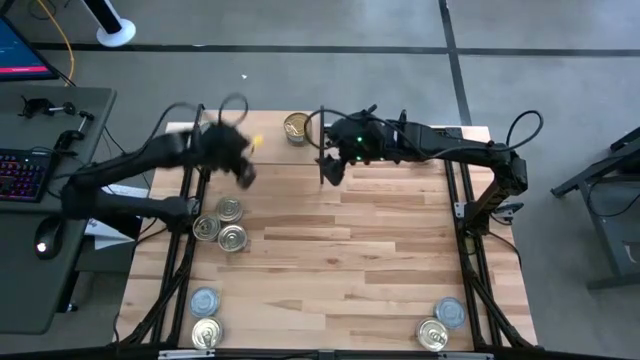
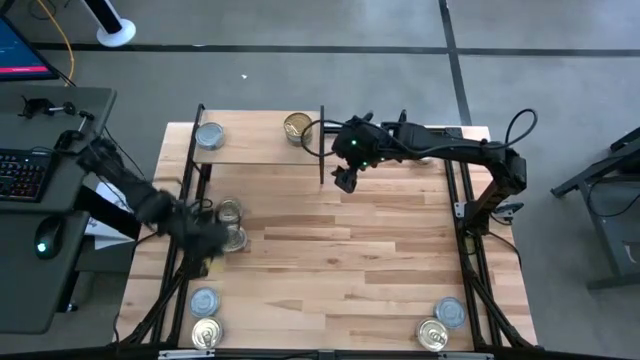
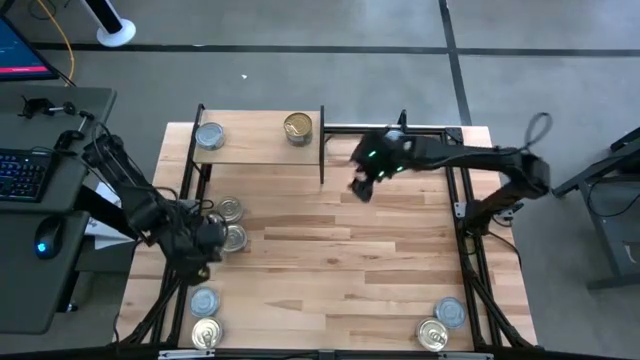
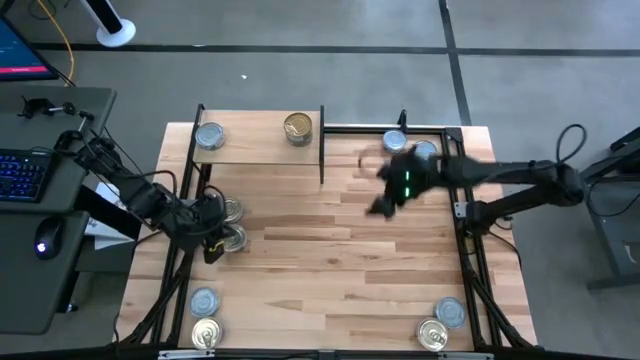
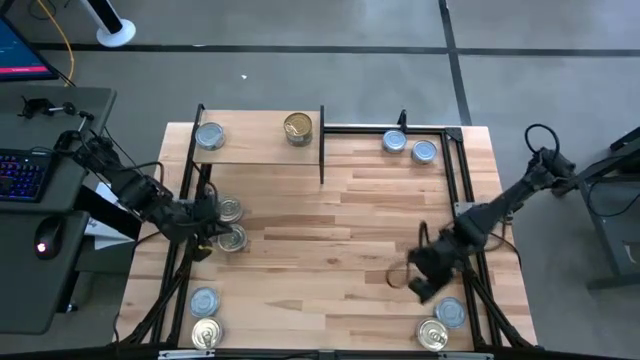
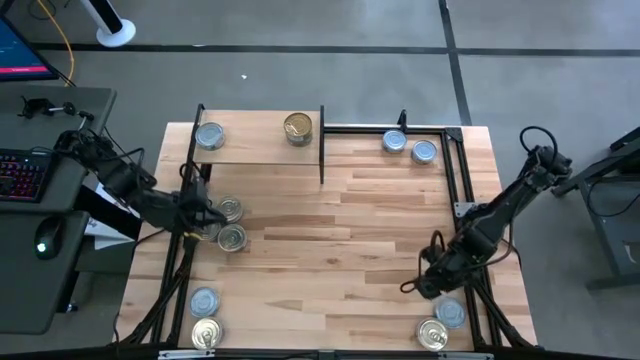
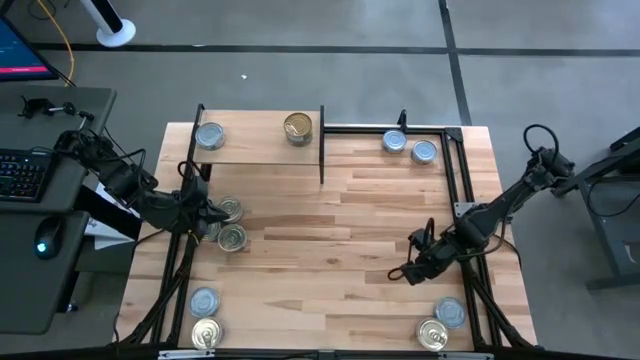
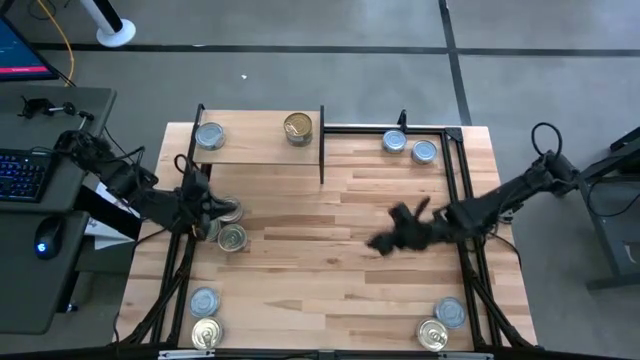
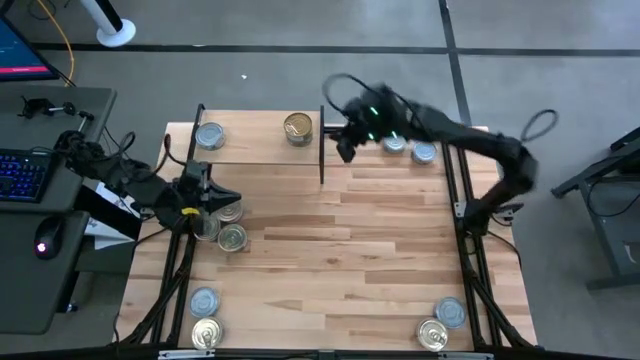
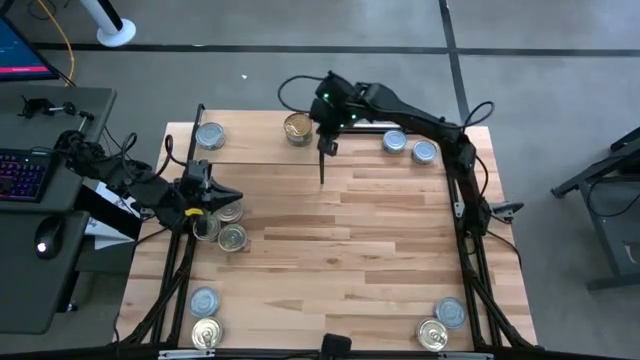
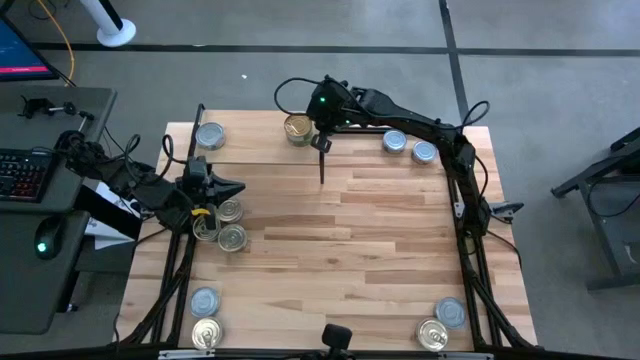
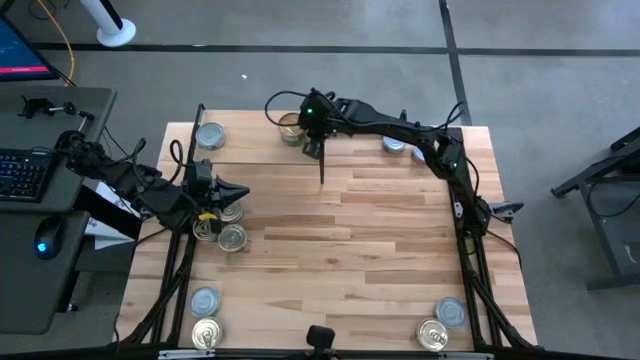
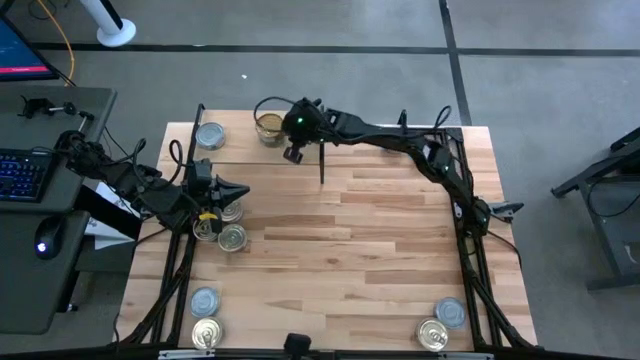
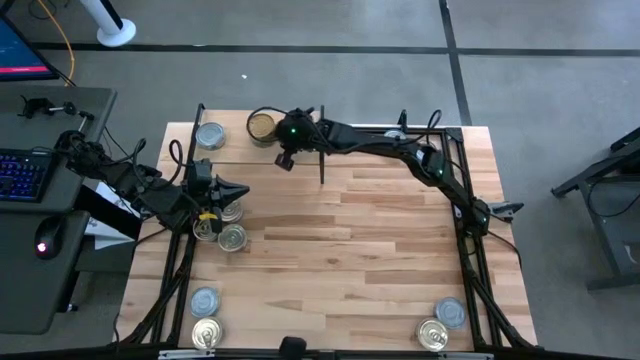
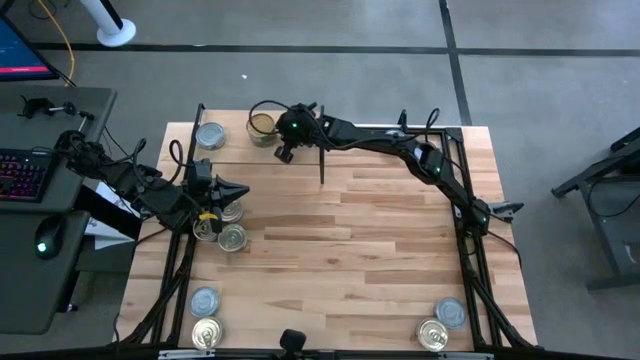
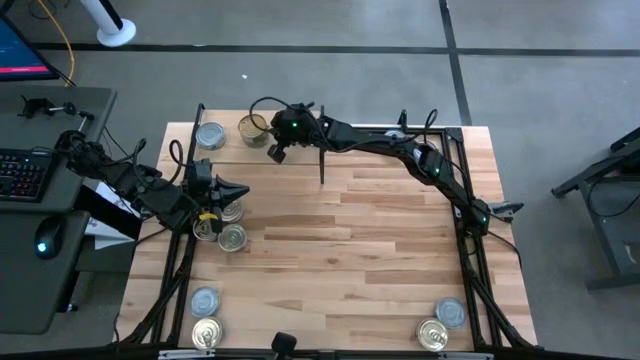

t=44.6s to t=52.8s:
Task: Stack canned seafood by type on shelf
Adjust the green tuna cans on the shelf

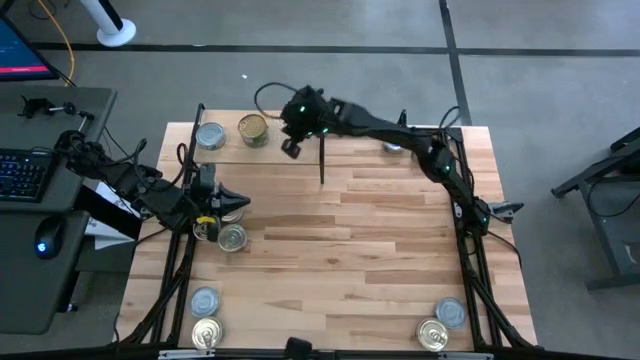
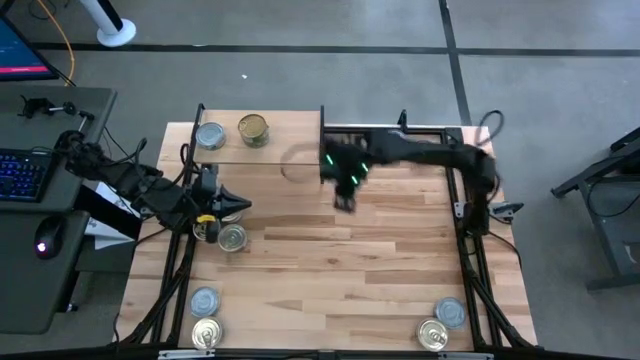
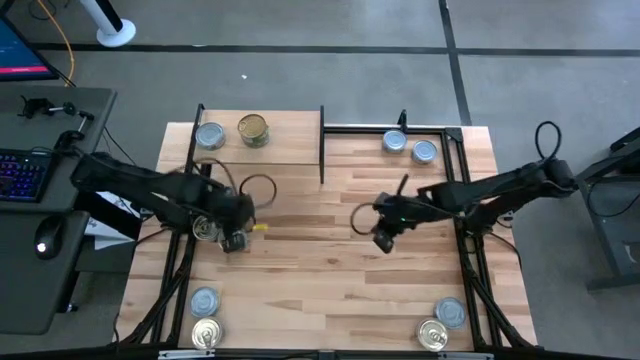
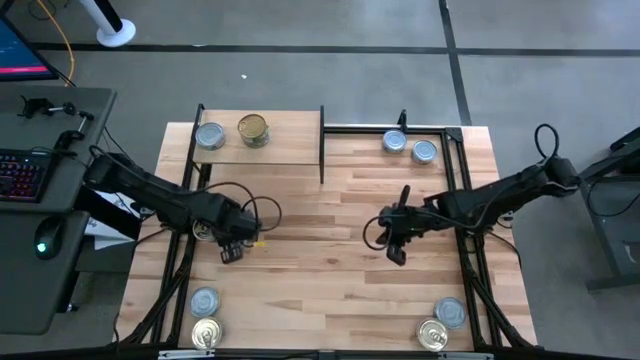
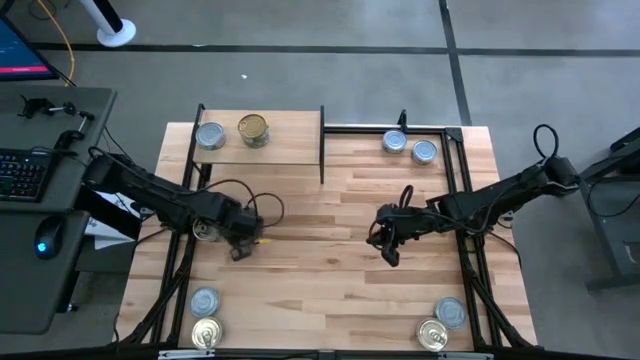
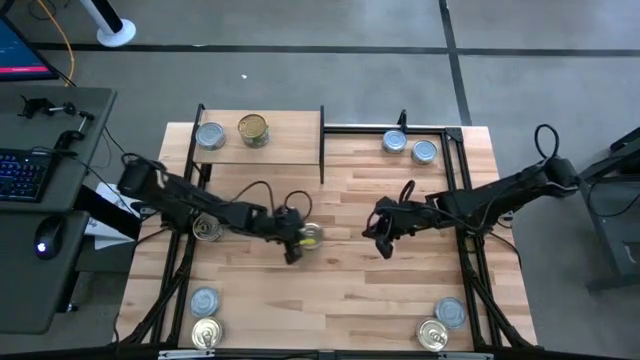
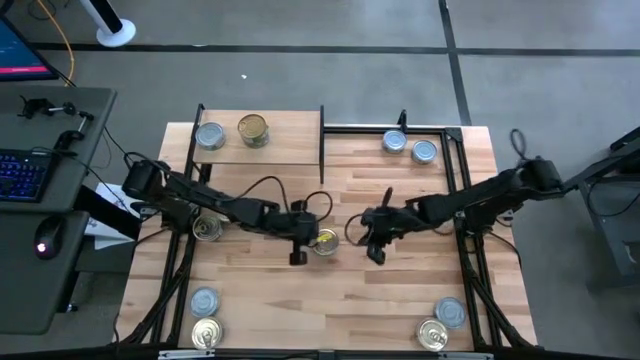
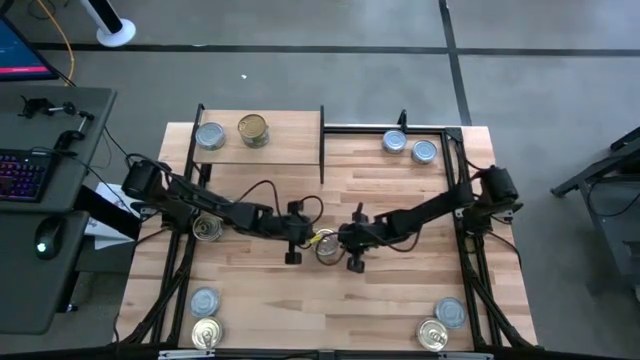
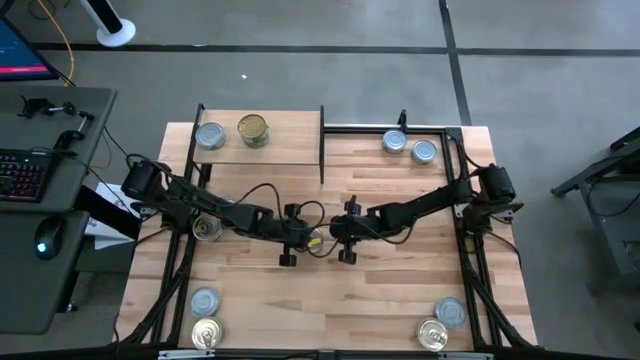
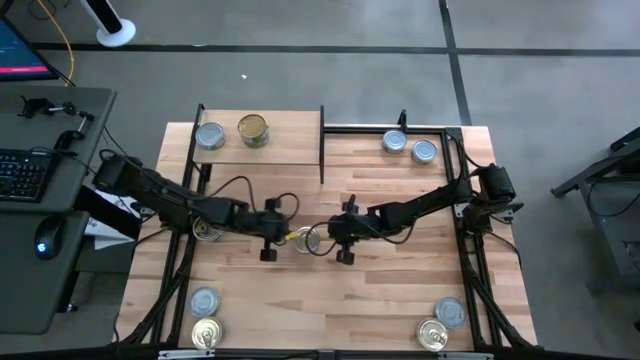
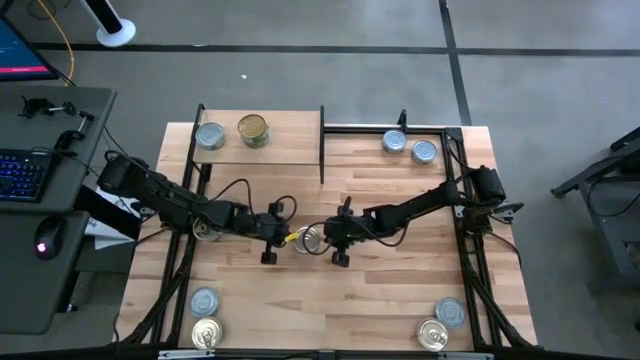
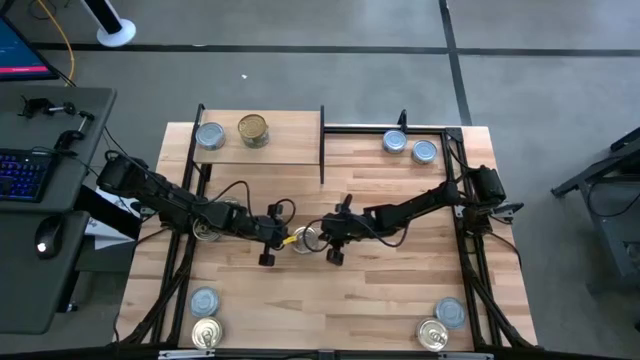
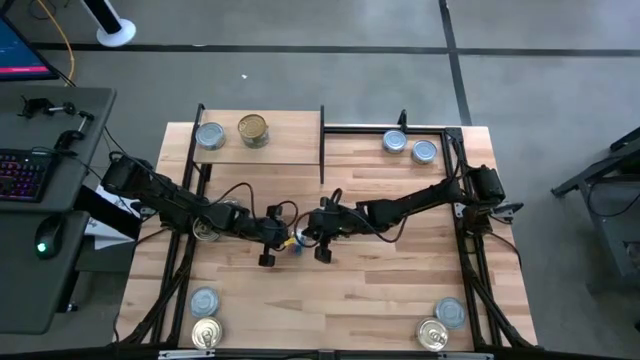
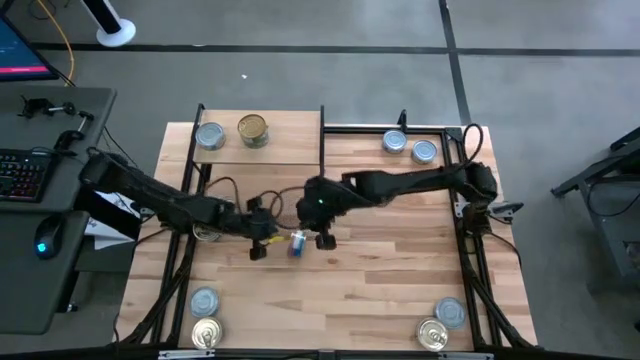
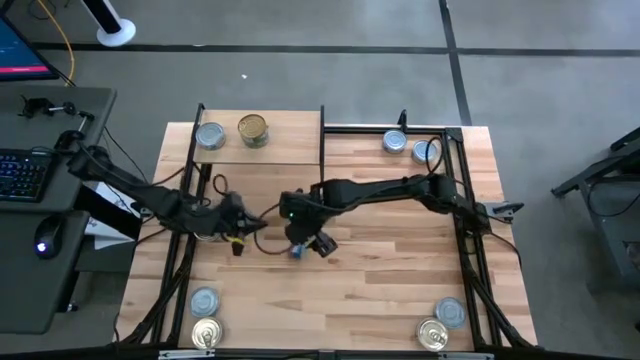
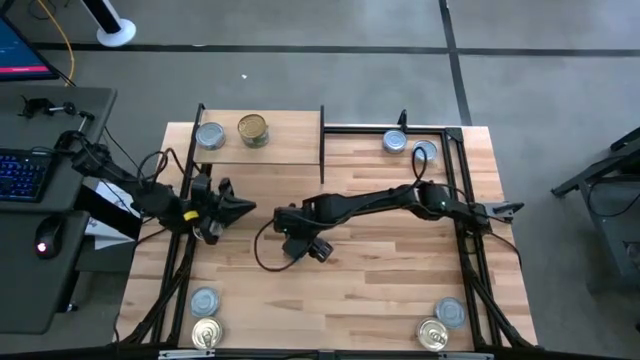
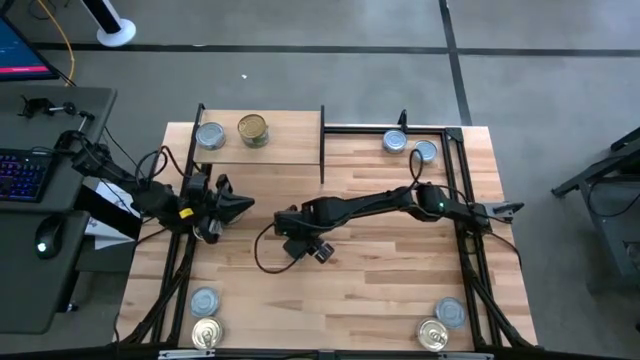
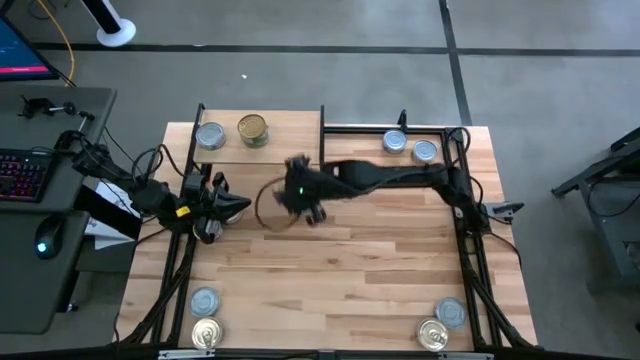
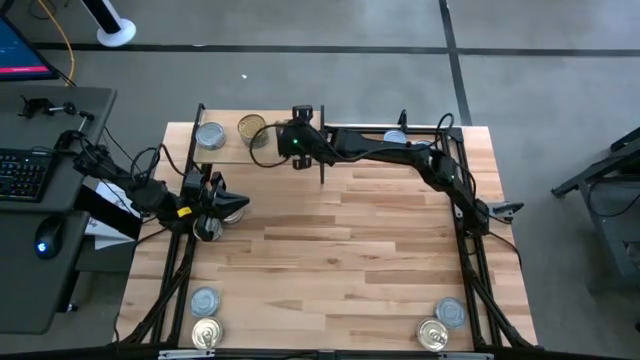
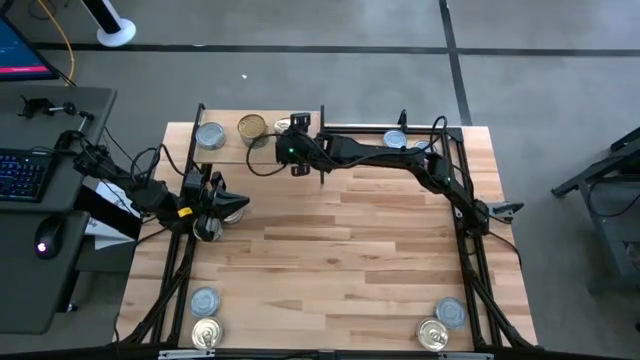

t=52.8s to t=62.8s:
Put the blue-pink tuna can on the shelf

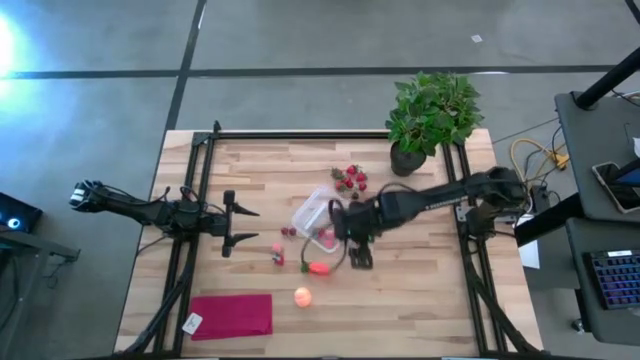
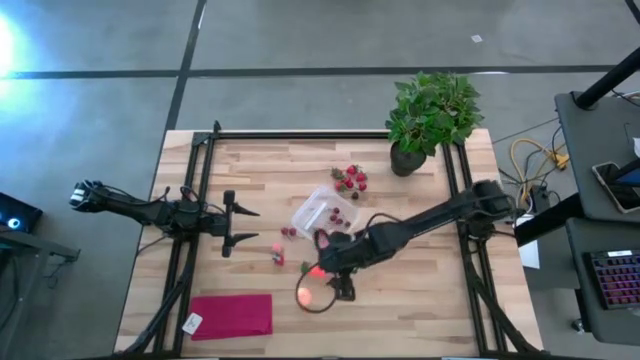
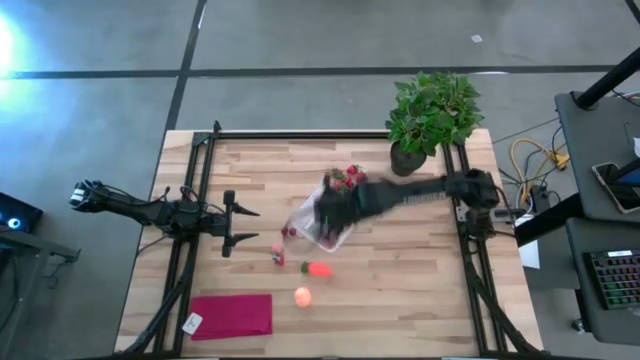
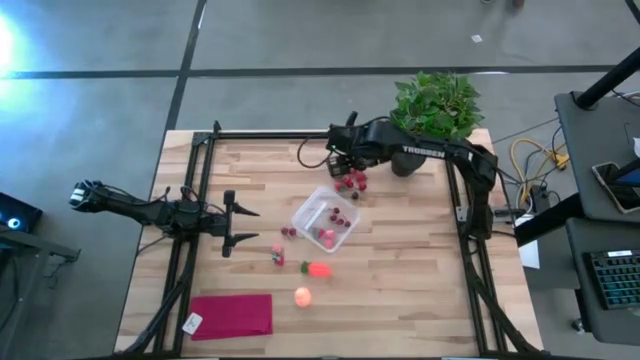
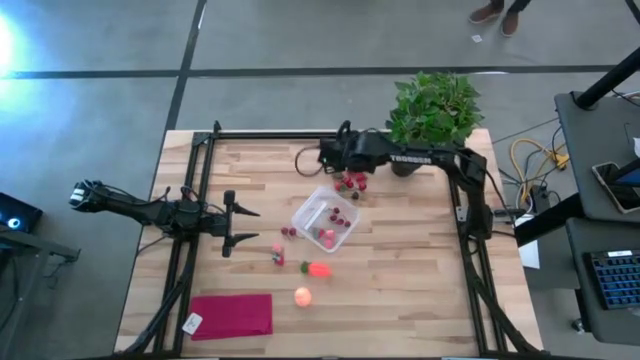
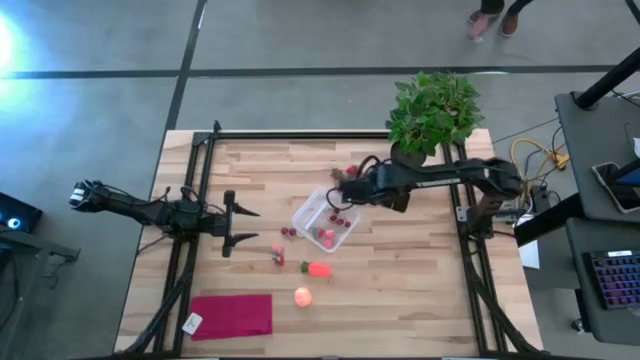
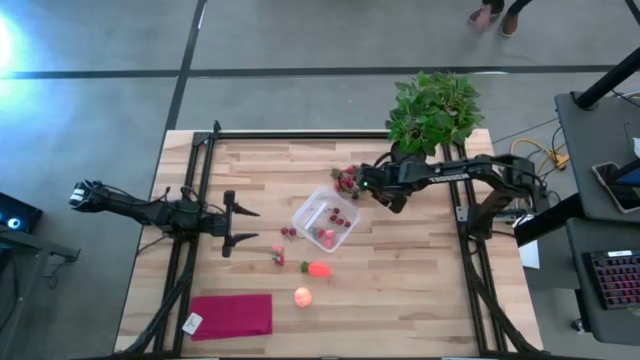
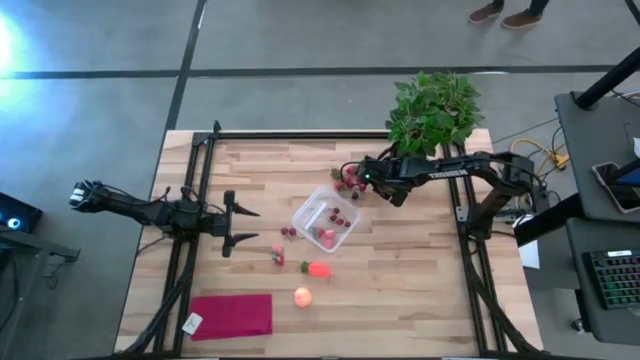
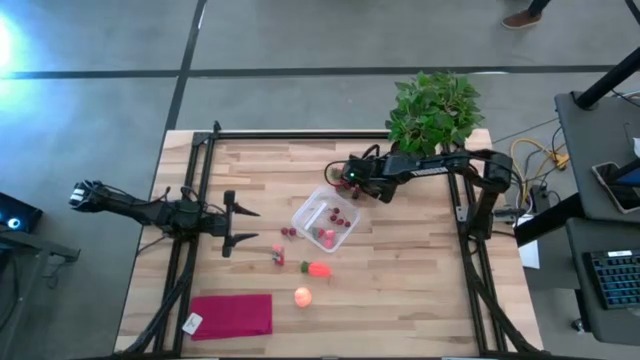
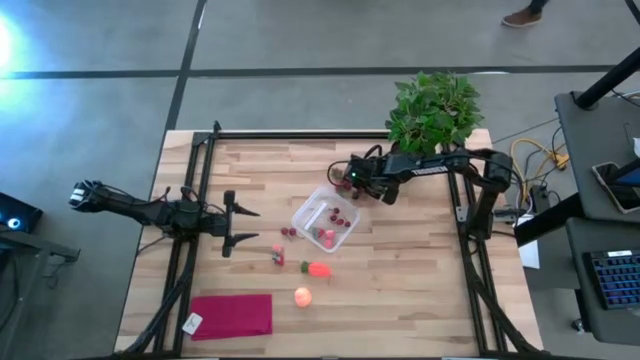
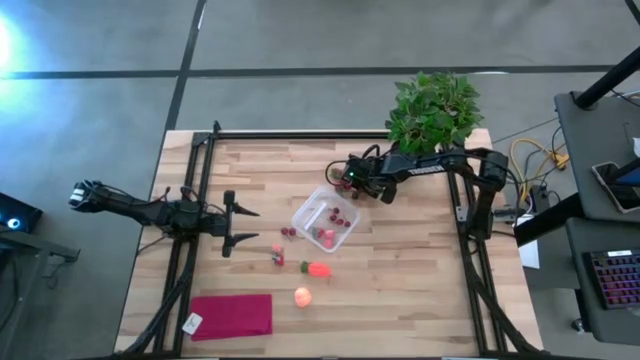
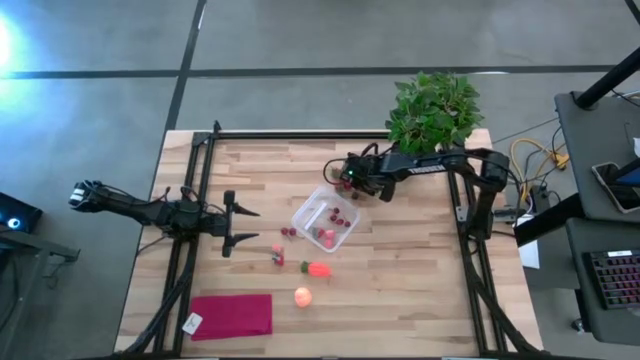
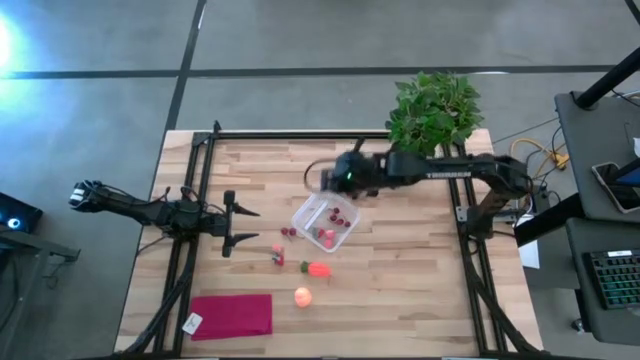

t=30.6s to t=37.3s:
Task: Pick and placing Produce into tupperware
Put the red cherry into the transparent container
